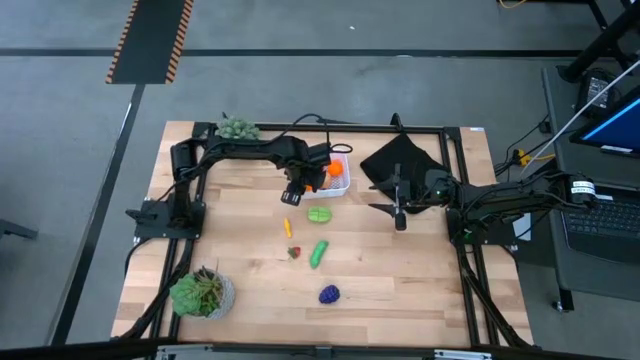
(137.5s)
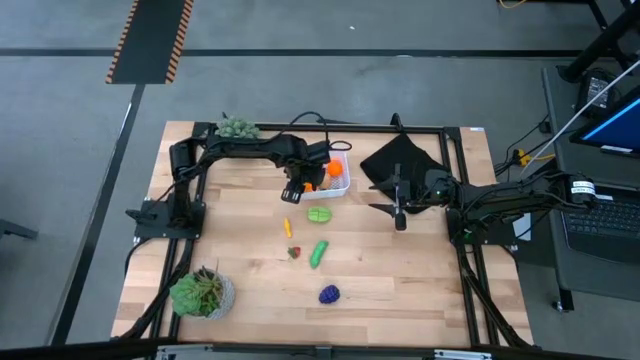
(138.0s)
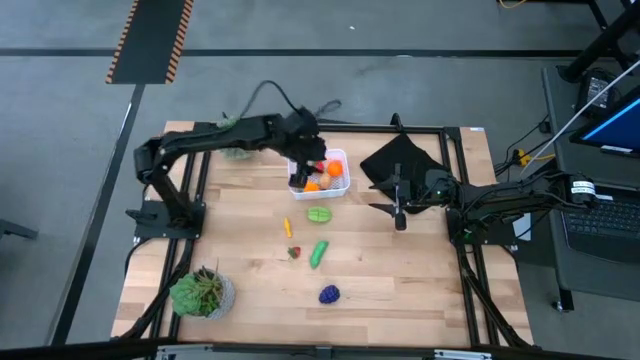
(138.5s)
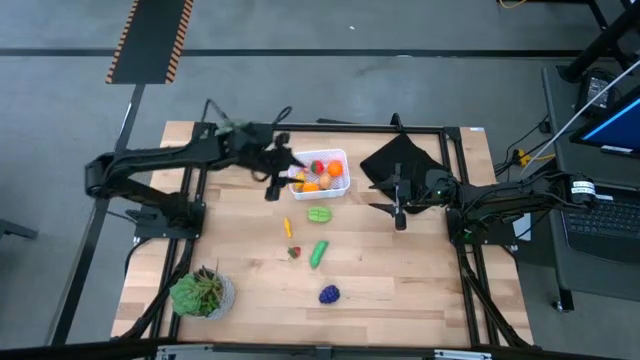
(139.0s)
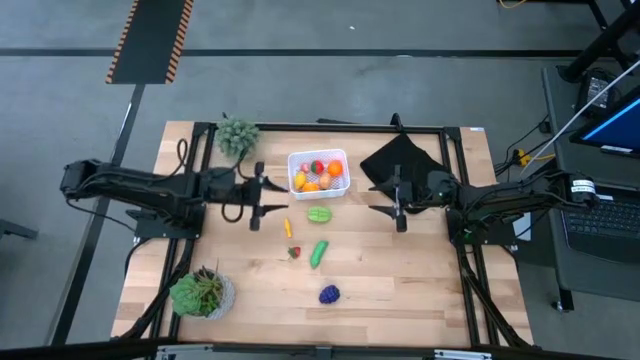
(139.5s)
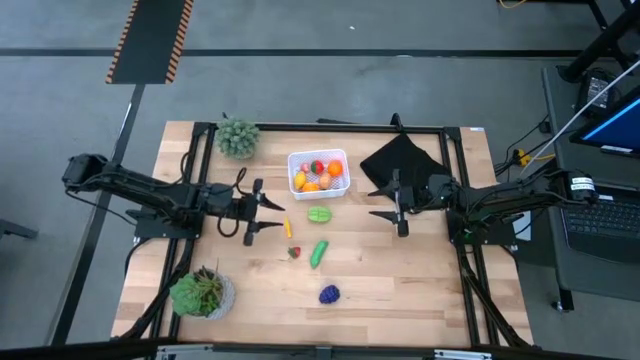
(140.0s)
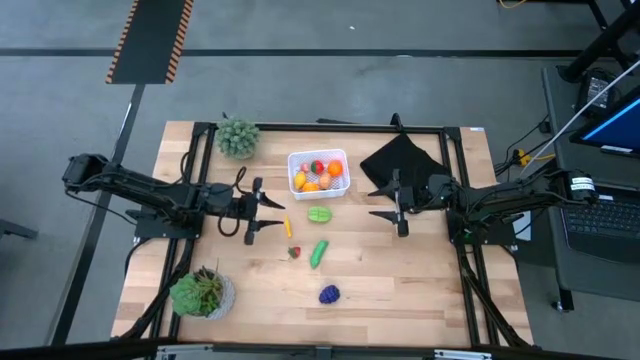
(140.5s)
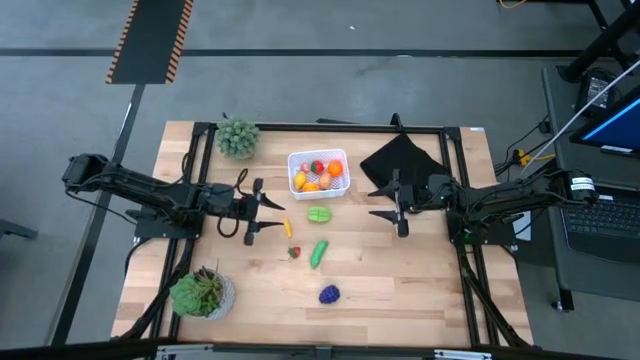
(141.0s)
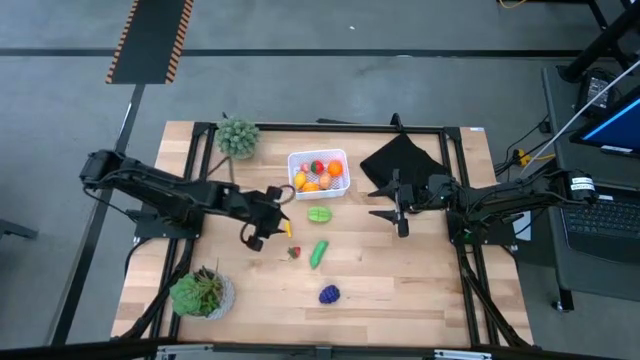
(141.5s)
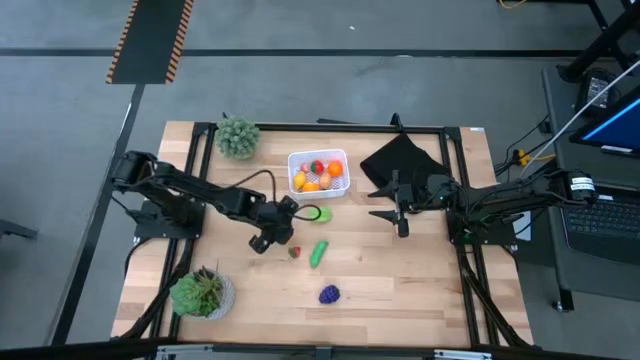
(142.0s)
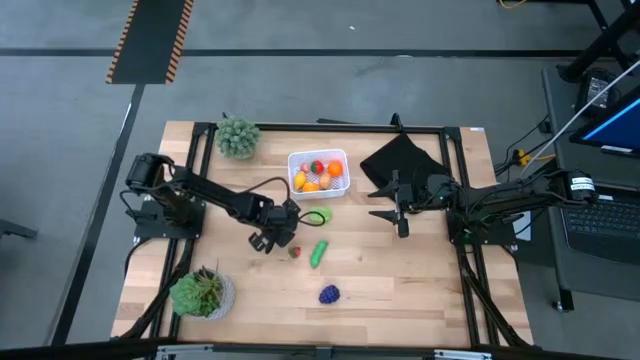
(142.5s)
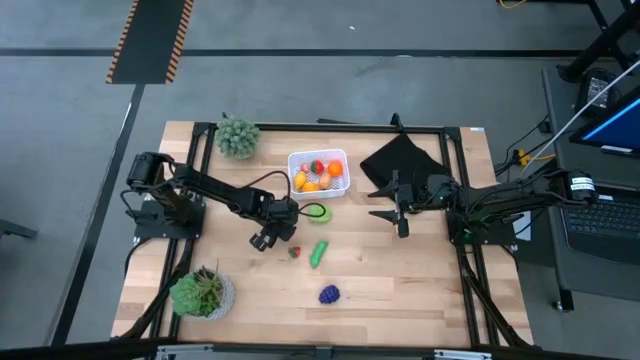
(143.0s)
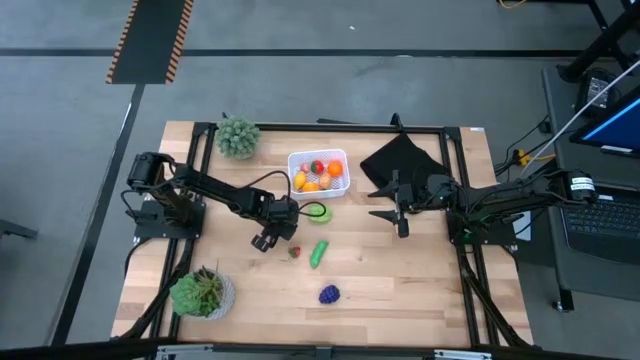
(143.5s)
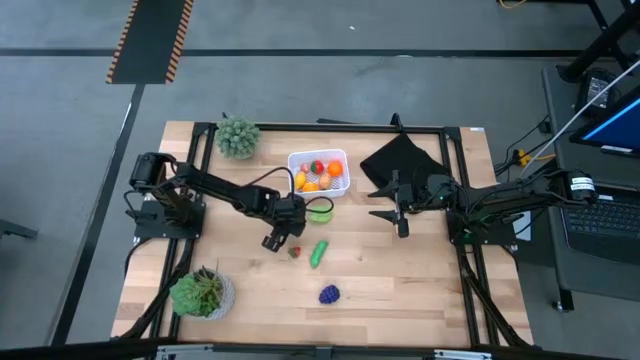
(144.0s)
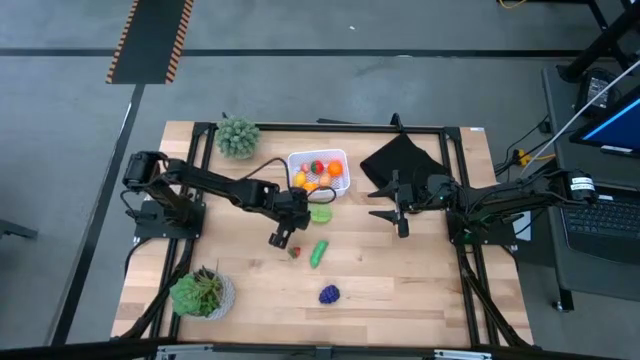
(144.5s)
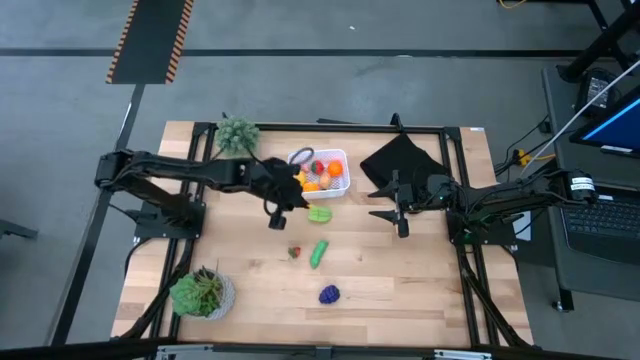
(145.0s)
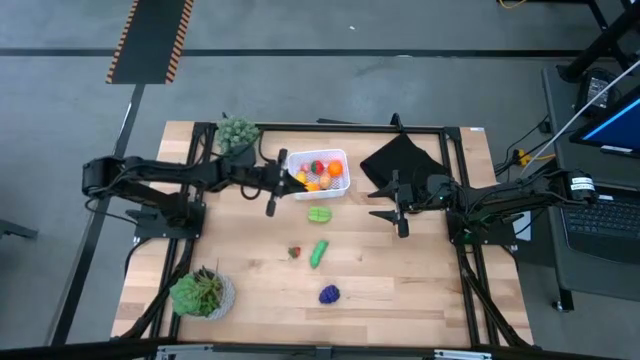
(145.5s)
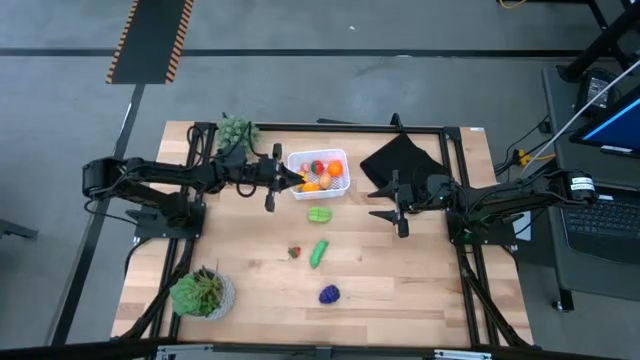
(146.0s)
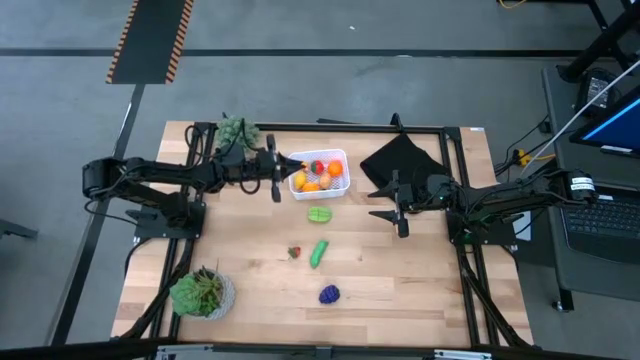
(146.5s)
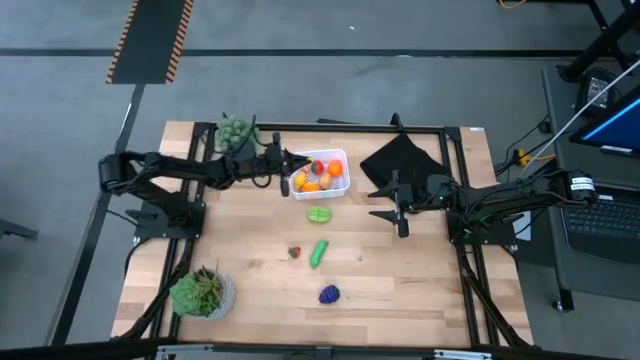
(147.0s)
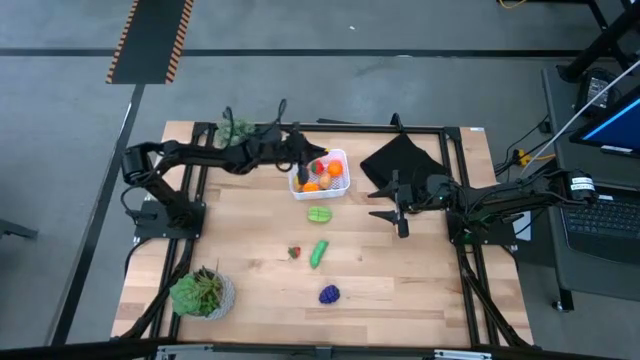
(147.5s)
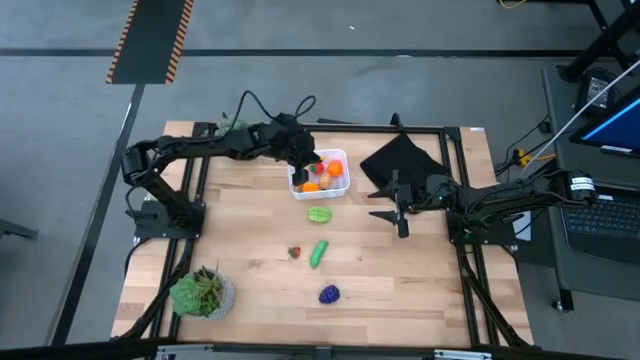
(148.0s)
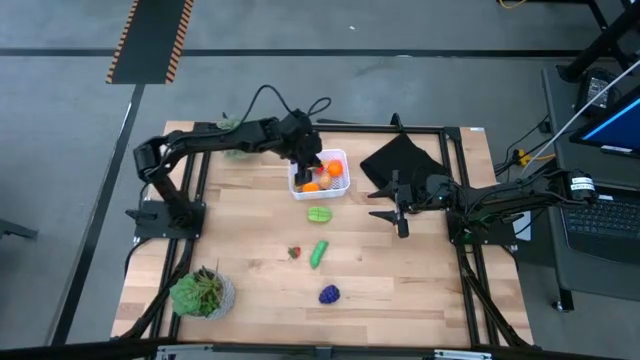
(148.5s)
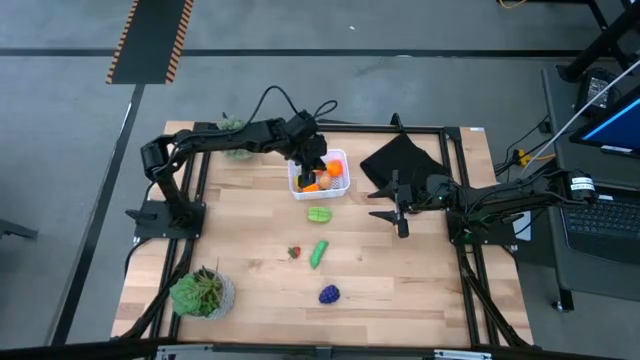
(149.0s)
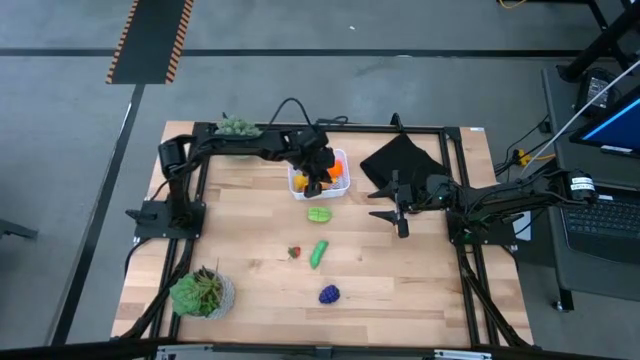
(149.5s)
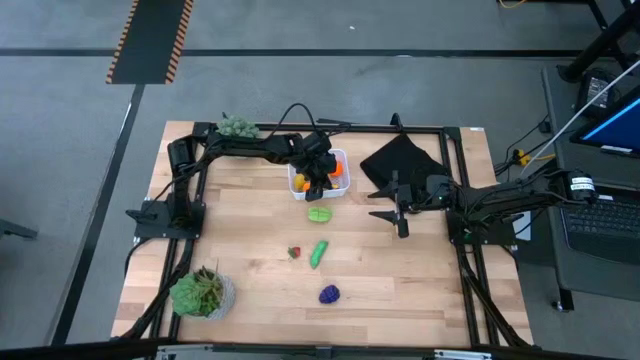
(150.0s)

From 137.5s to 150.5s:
Task: Pick and placing Produce into tupperware
Put the corn into the white bin

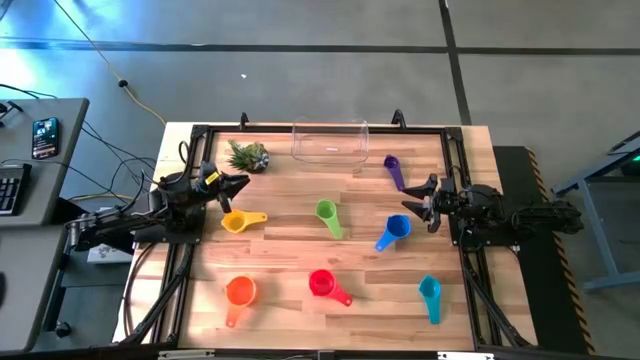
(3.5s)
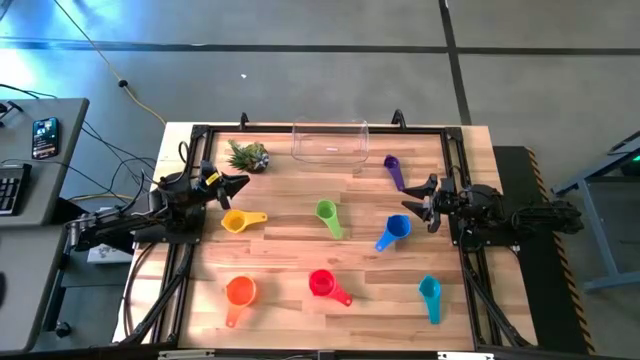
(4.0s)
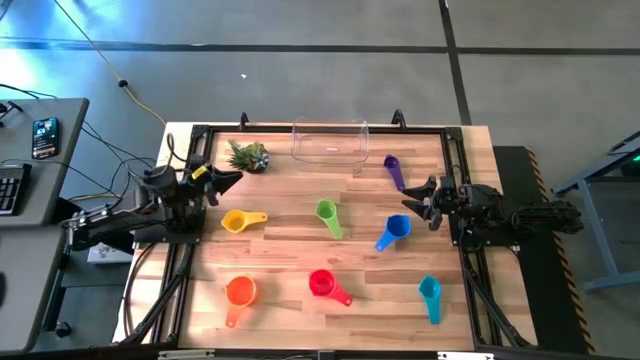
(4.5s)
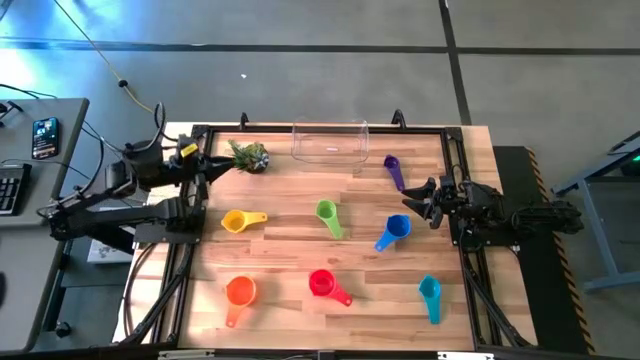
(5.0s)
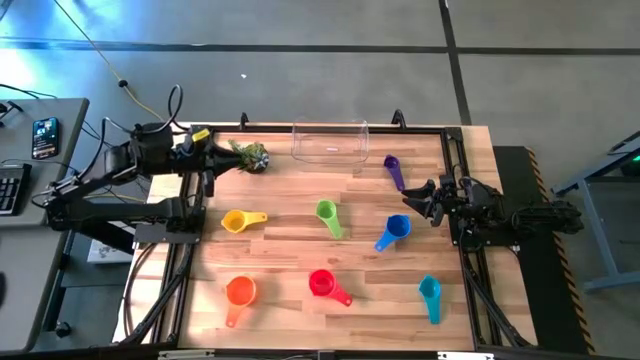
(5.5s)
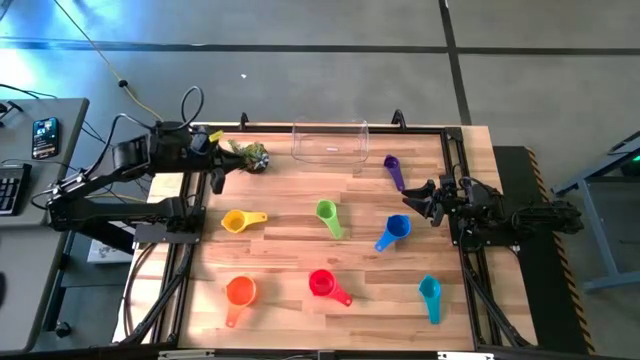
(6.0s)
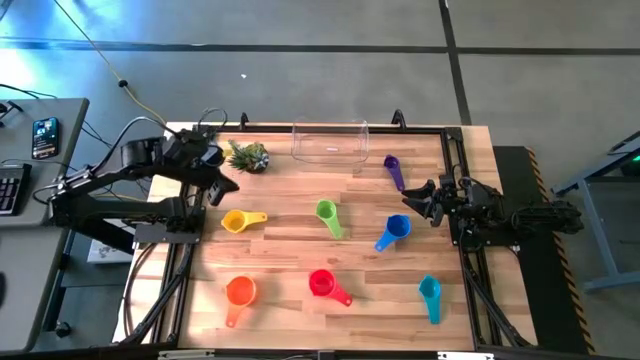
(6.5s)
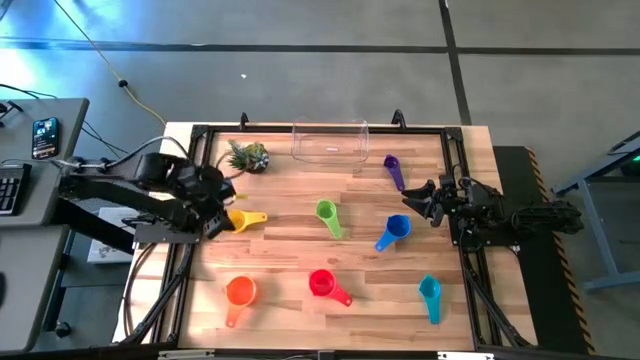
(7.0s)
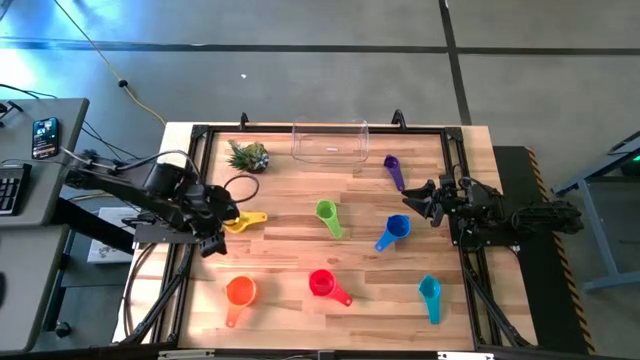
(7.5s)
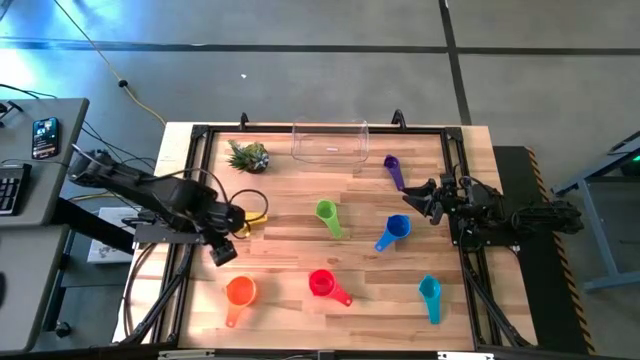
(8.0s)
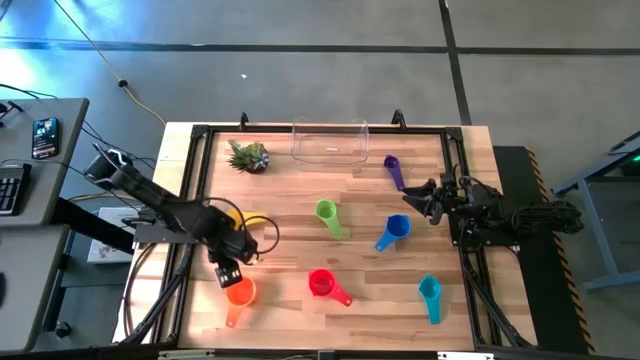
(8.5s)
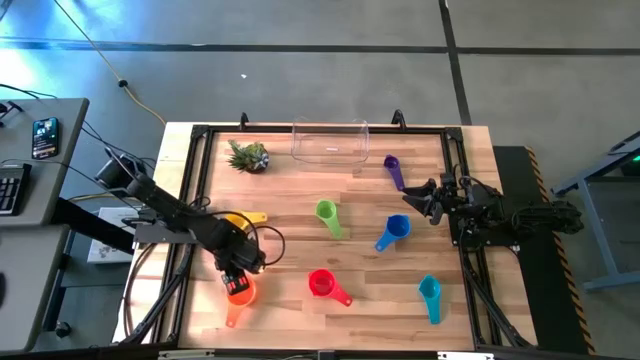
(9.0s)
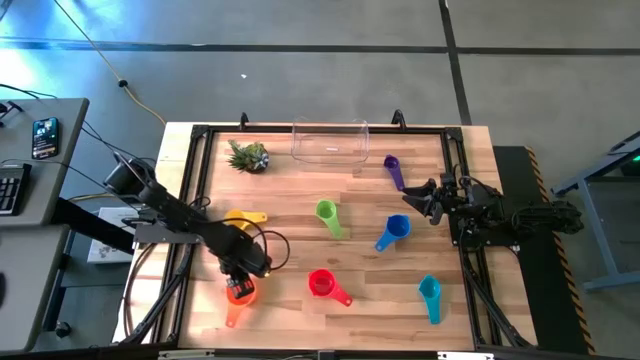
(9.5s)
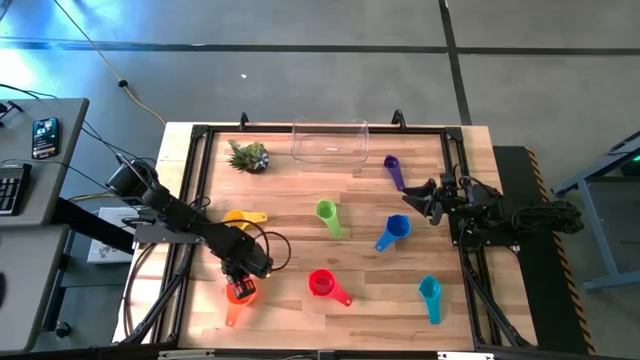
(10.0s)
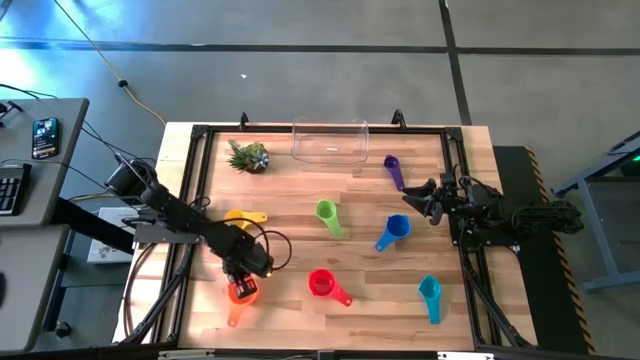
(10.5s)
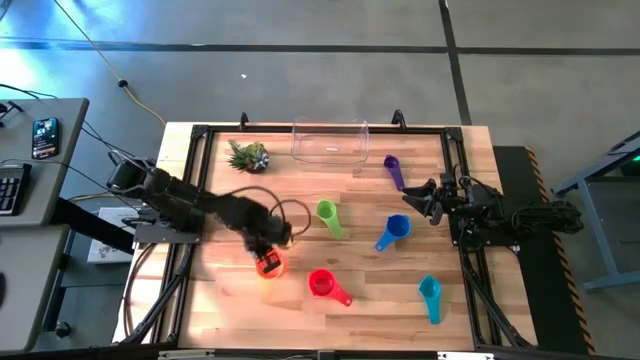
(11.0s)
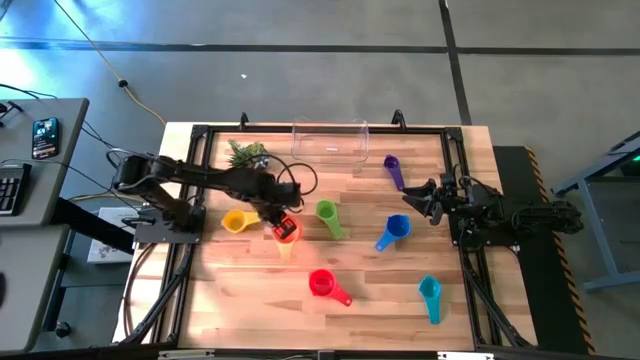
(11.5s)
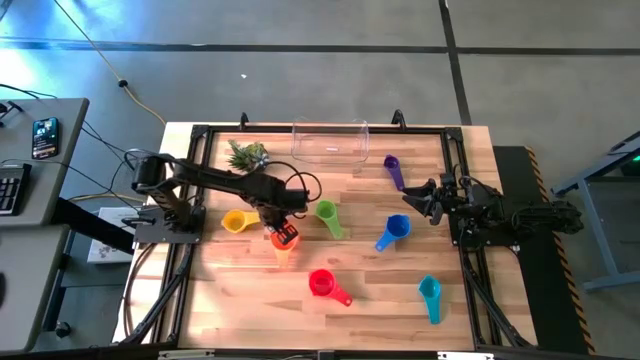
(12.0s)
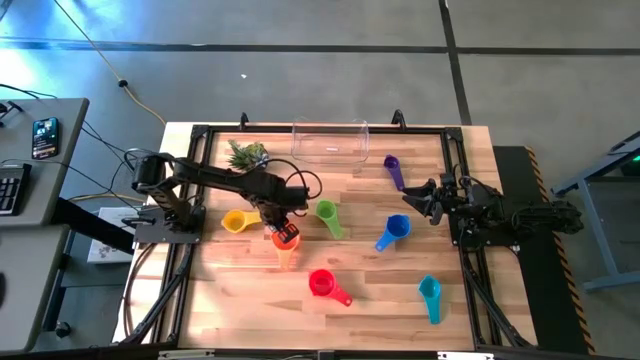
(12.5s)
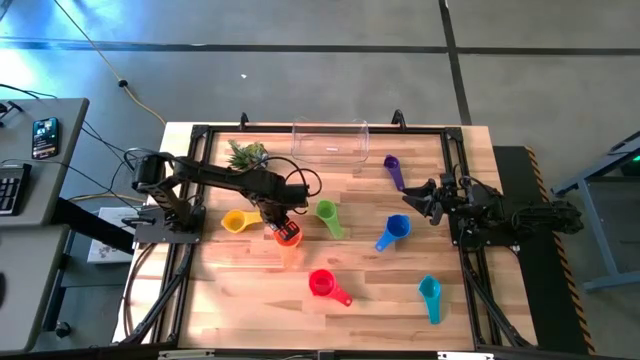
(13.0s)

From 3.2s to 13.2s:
Task: Nest measuring cups in basket
Move the orange measuring cup to the middle left
